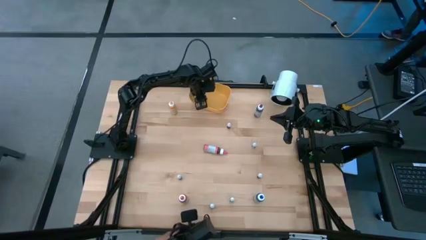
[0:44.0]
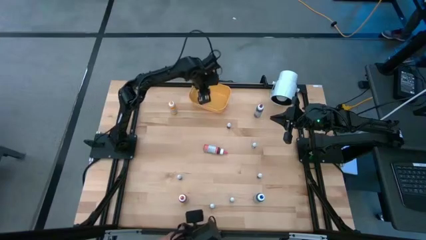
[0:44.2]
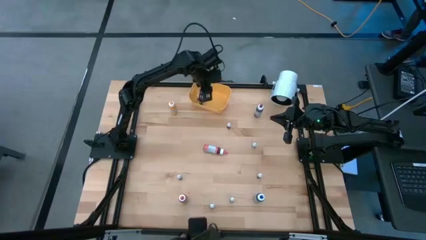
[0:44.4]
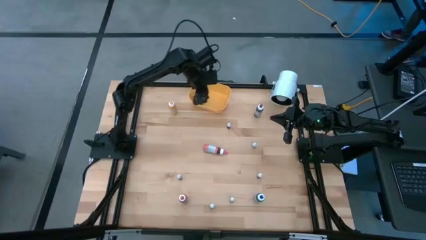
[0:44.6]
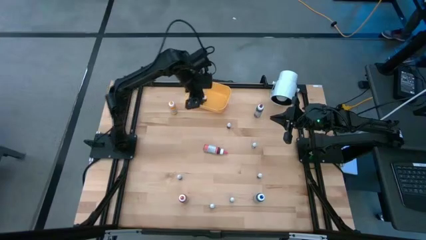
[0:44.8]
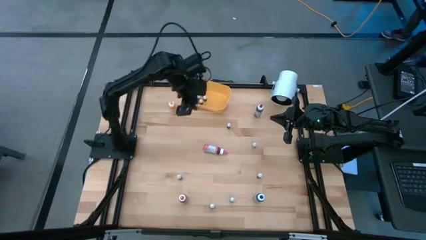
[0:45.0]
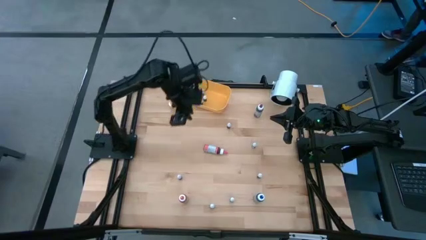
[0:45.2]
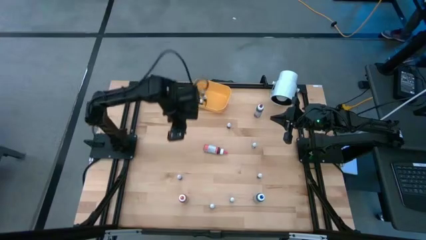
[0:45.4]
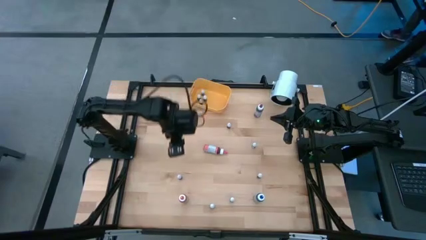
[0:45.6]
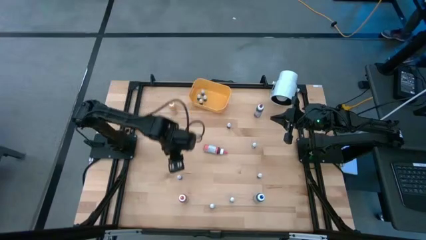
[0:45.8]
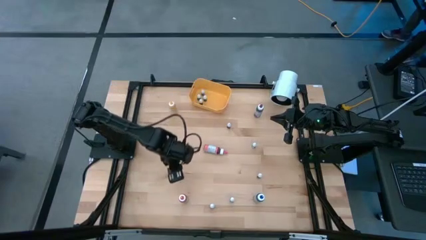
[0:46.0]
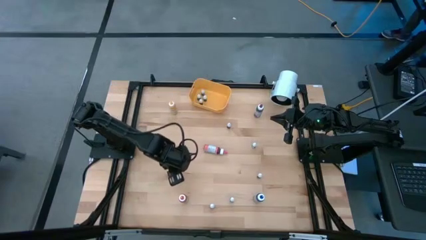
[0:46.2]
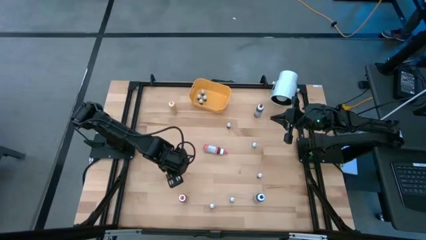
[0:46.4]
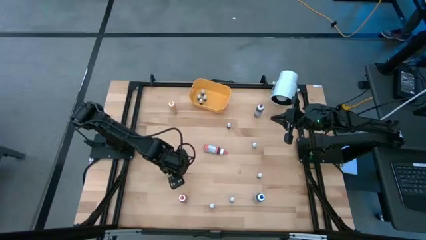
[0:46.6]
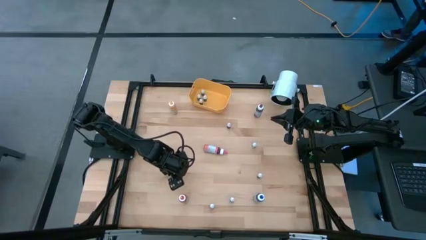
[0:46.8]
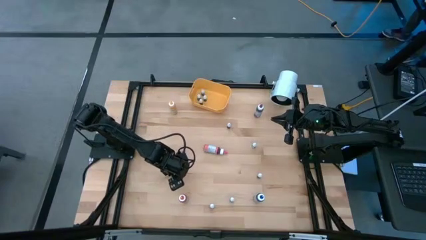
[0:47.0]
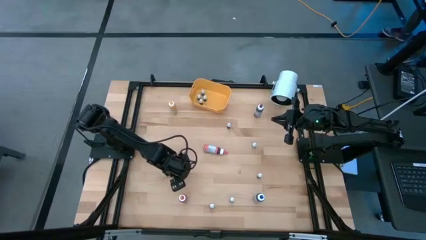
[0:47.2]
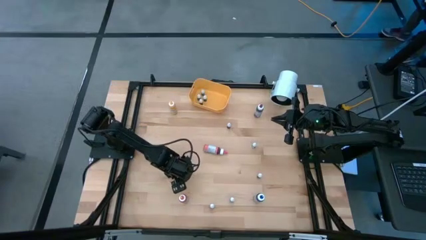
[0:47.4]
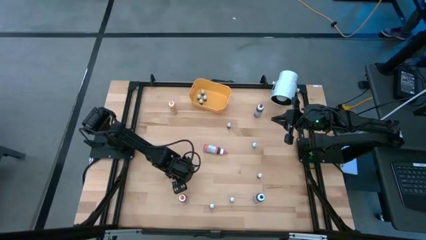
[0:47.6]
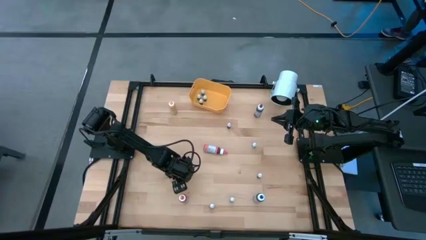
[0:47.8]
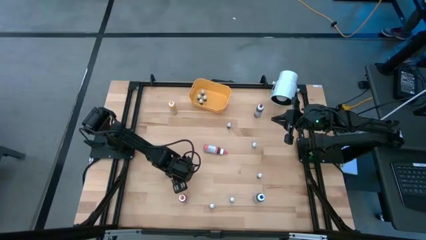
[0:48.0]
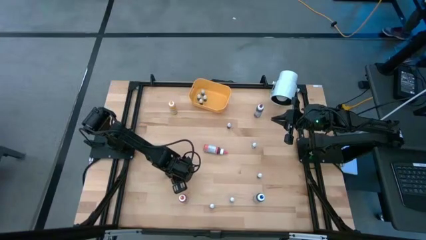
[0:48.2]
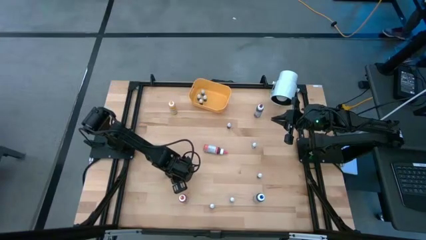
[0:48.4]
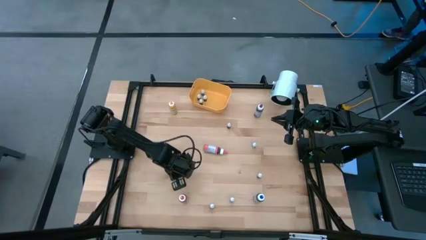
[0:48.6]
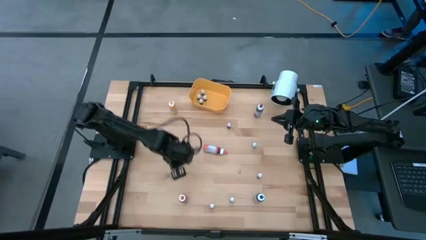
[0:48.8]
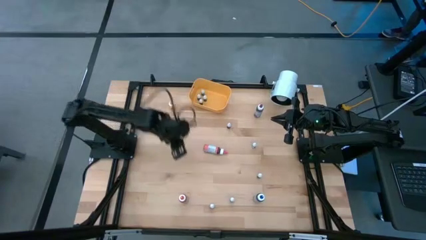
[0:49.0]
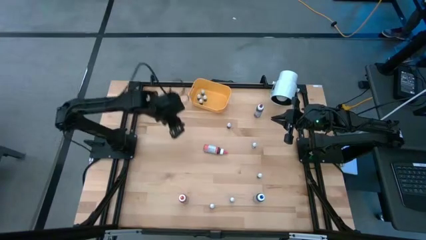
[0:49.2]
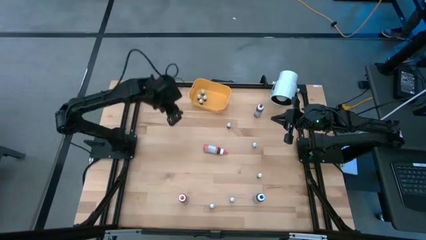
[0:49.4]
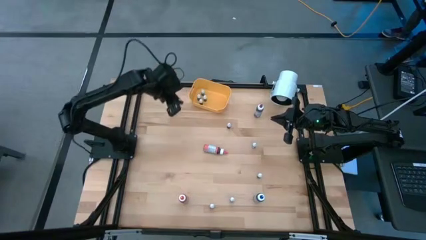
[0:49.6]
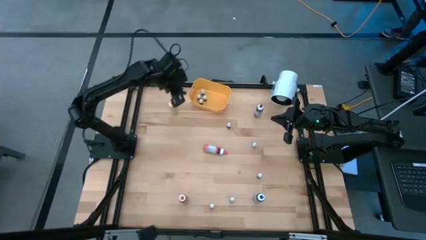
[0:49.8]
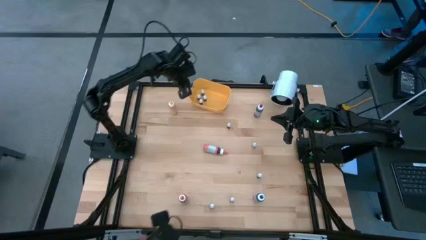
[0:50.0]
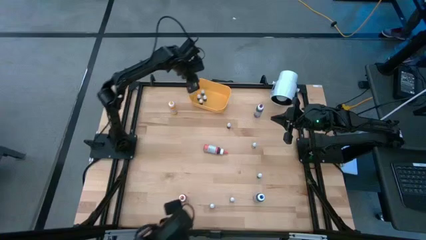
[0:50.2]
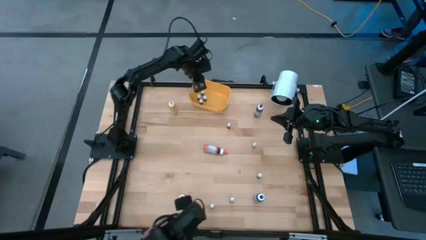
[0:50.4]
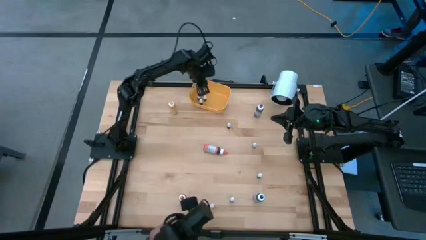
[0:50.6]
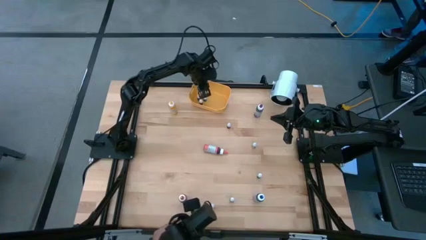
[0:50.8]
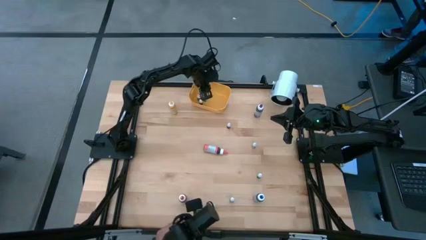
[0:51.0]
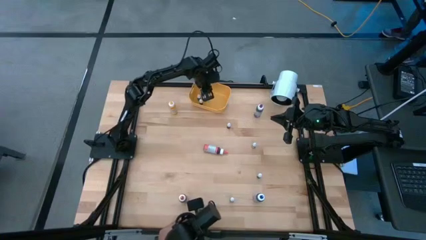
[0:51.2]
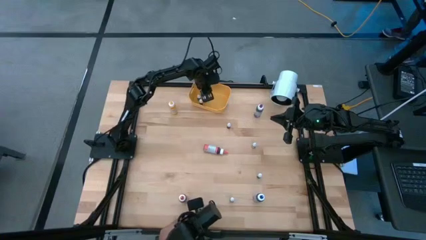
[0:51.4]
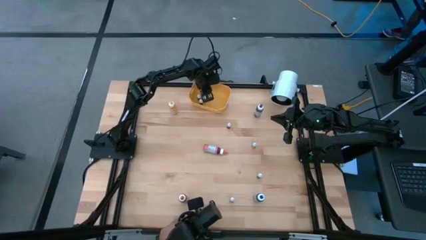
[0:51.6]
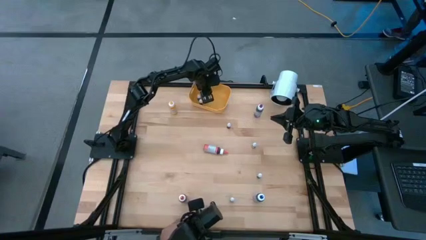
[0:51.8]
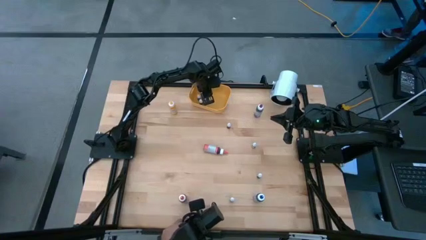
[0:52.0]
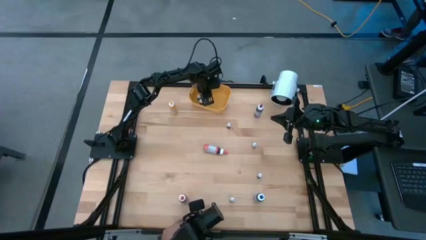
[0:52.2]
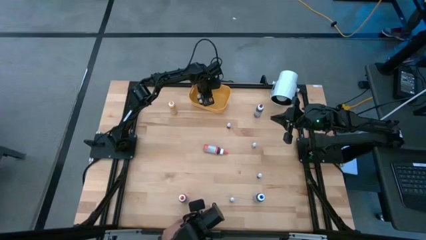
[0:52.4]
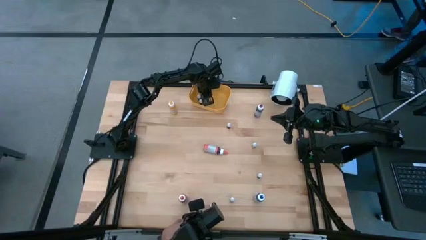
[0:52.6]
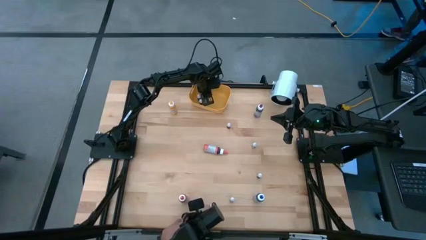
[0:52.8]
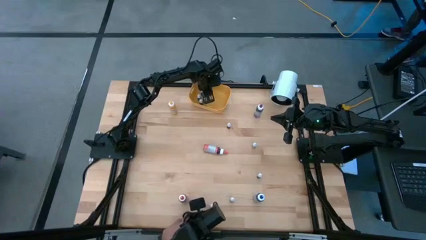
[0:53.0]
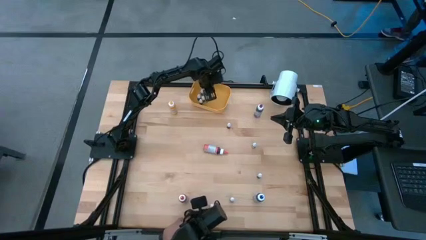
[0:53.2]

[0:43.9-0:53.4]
Task: Pick & Place food coloring
Put the small blue food coloring bottle into the bin

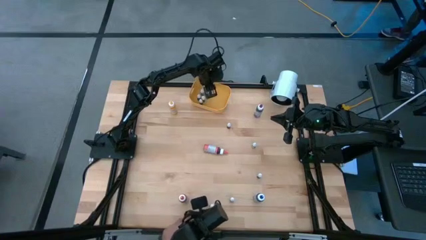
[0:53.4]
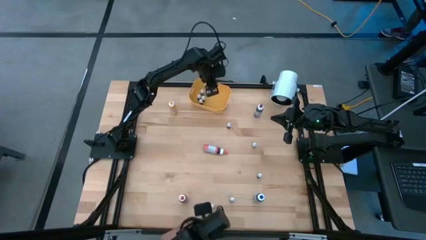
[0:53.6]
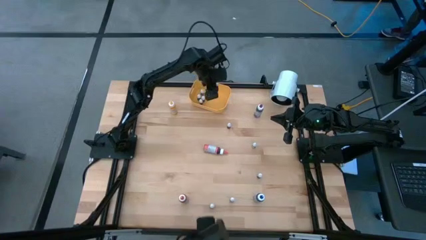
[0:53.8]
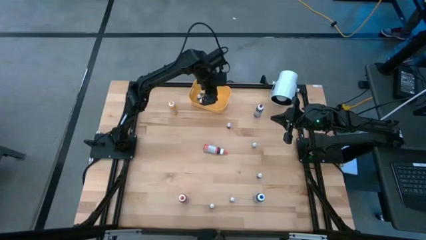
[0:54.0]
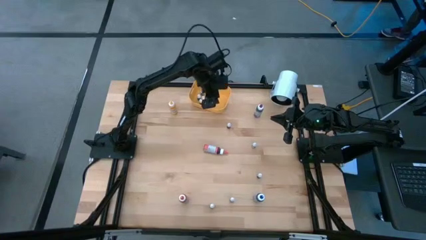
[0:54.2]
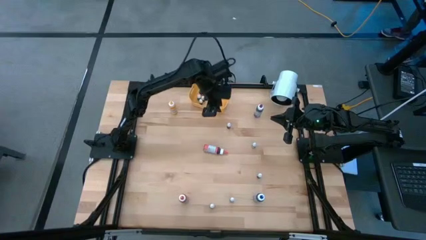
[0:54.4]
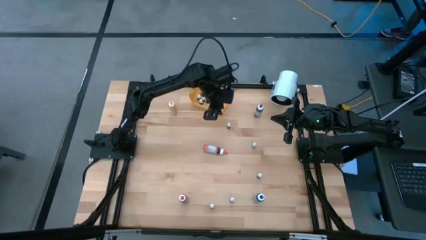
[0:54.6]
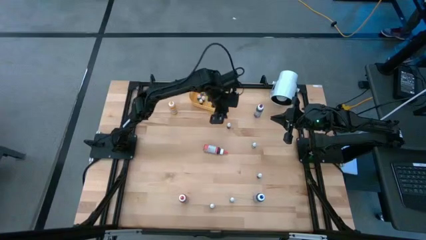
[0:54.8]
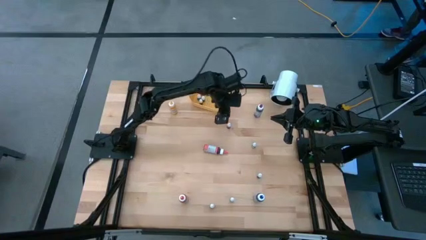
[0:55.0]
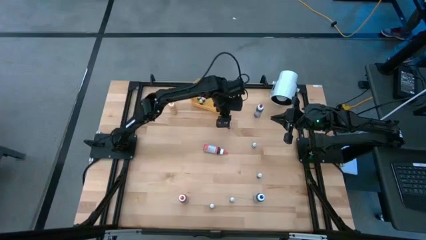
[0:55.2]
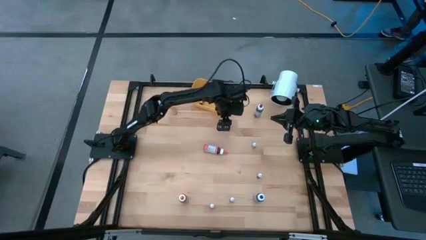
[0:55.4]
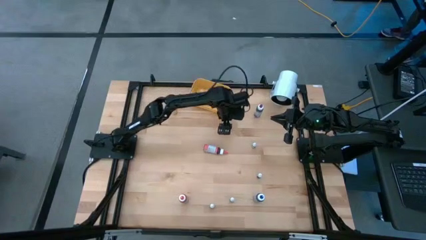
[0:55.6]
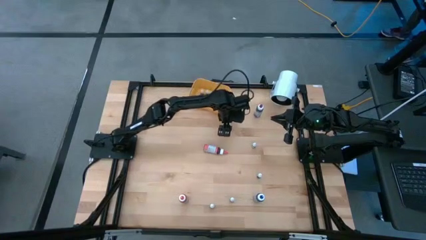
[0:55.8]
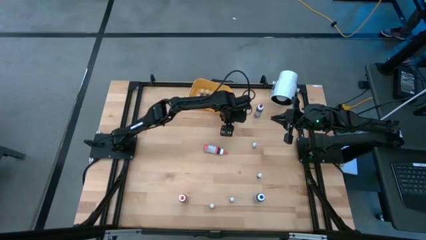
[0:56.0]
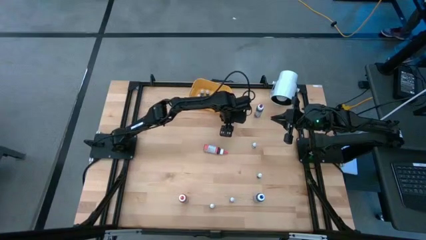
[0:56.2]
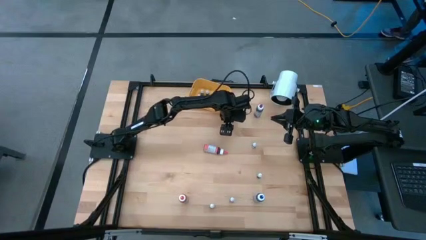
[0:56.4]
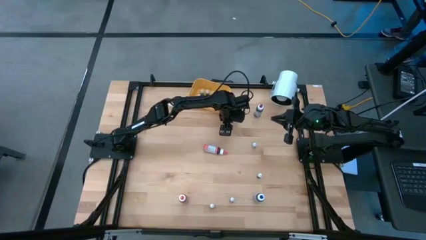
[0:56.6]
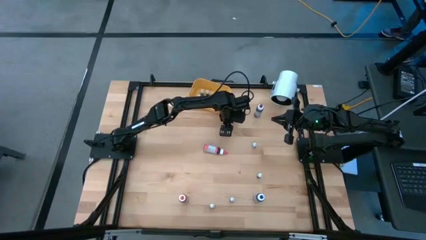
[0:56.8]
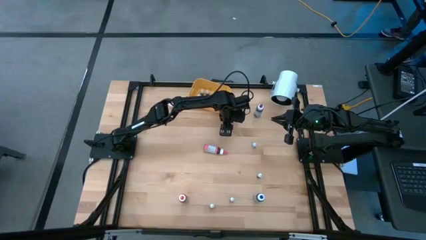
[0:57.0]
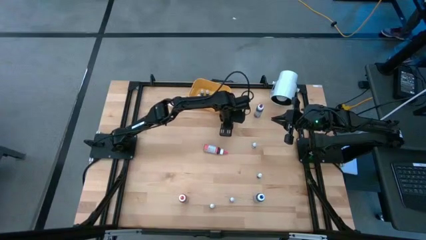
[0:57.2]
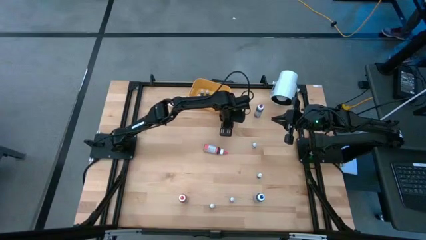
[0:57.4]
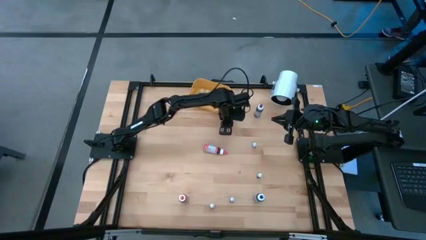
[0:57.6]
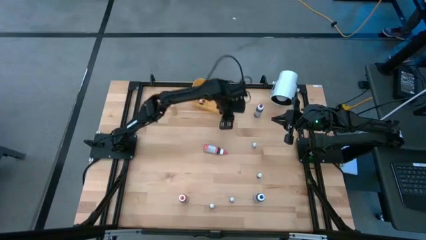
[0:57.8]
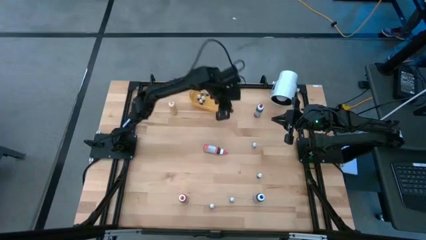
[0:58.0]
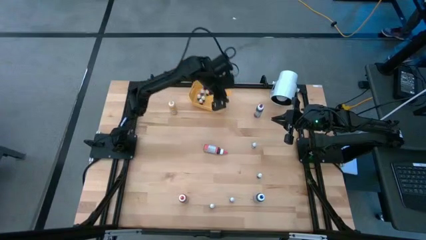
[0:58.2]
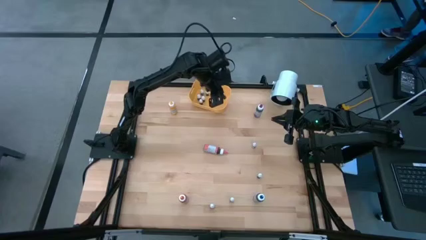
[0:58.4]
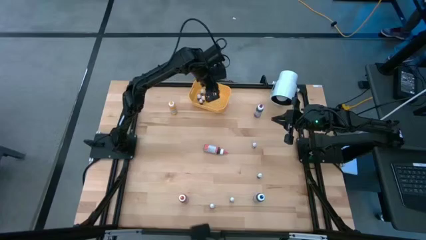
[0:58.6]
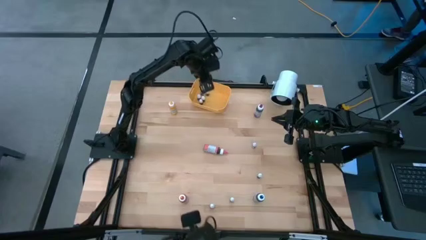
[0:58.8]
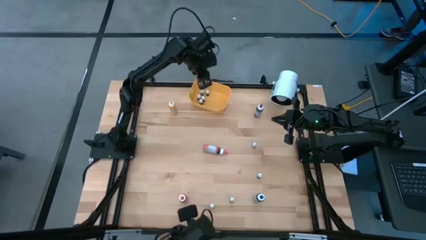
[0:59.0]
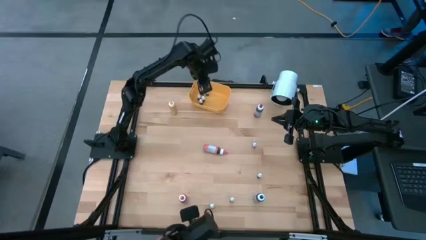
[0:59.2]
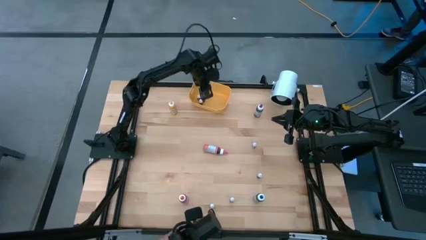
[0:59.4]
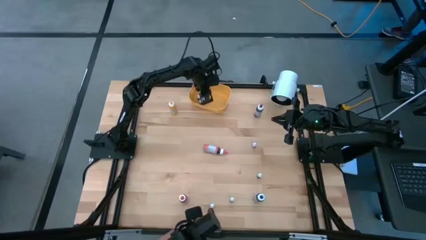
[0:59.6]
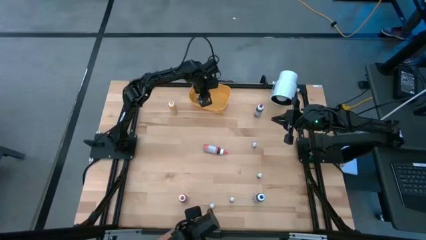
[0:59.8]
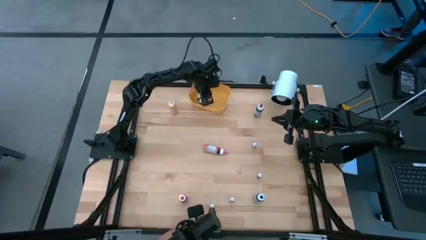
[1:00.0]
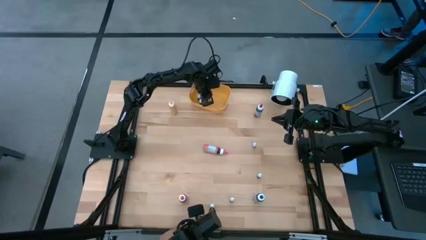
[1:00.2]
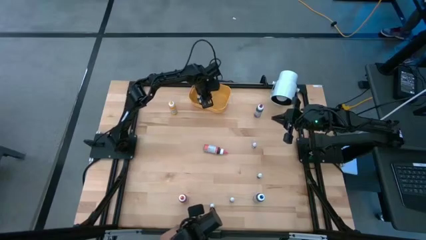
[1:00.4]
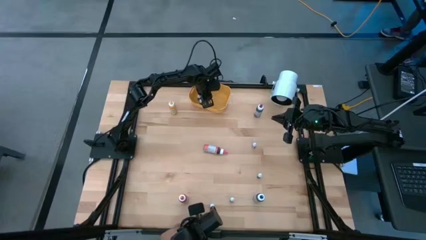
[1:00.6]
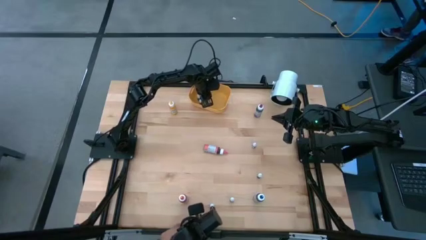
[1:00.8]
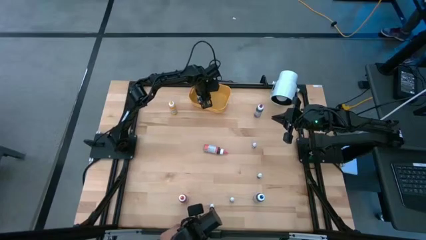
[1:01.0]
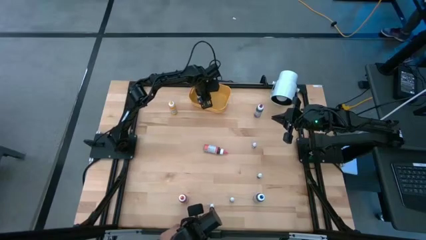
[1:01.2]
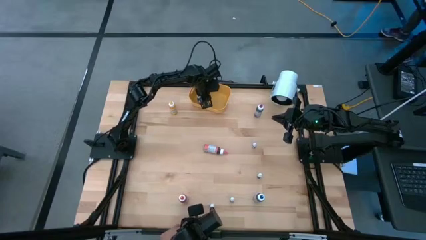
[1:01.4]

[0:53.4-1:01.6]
Put the small red food coloring bottle into the bin
